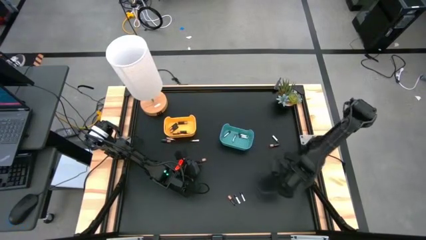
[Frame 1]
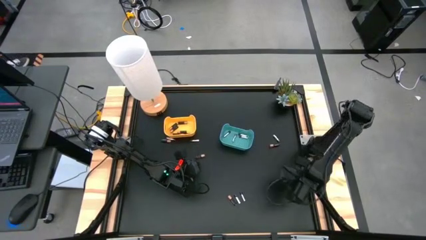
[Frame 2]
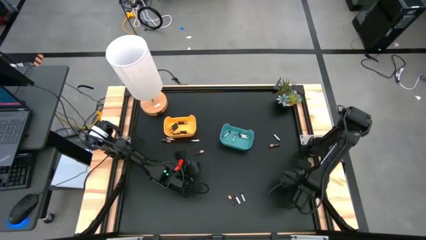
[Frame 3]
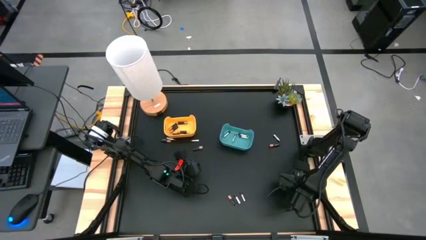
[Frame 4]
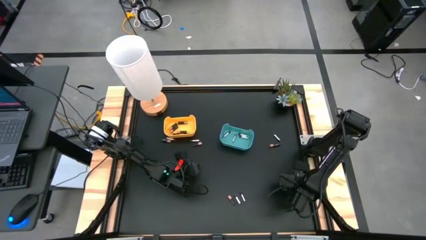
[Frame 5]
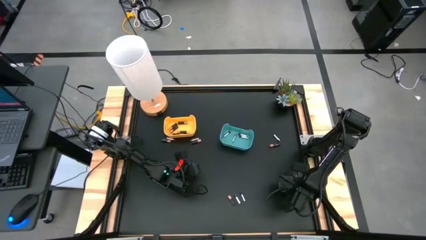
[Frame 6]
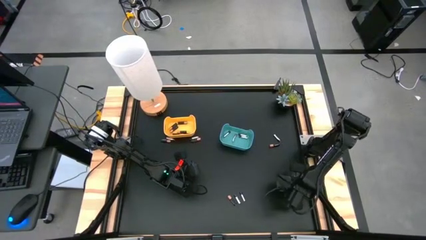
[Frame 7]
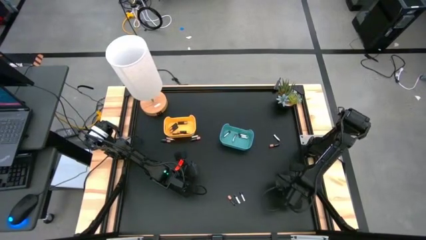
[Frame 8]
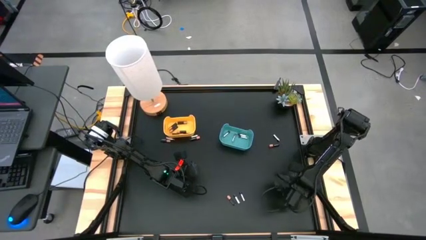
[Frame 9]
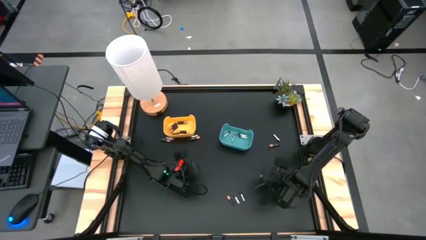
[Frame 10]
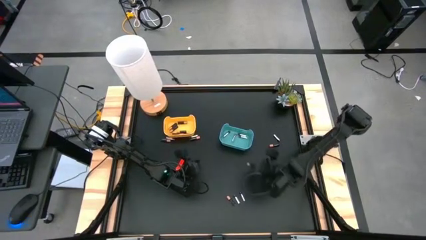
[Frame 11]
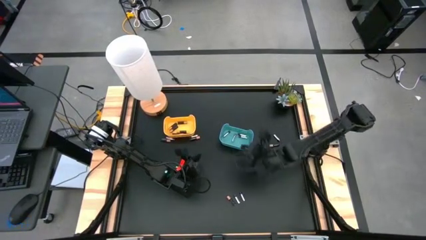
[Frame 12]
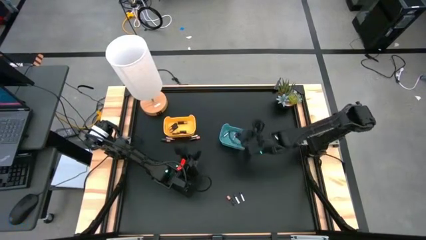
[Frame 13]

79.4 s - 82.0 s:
Task: Sort batteries
Put the silver battery into the blue bin

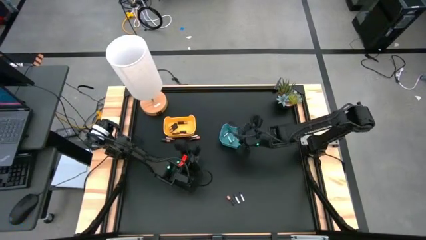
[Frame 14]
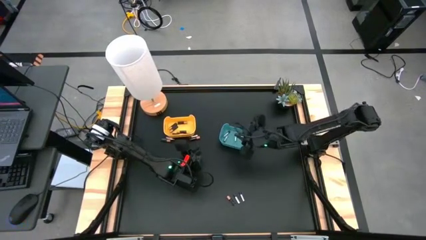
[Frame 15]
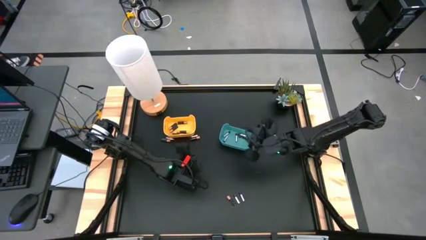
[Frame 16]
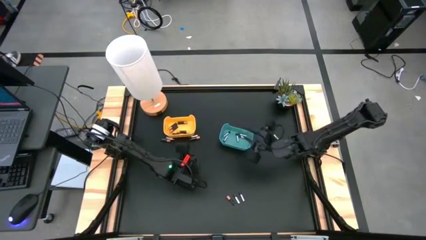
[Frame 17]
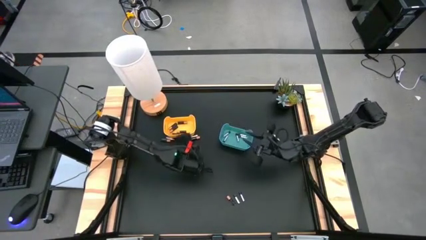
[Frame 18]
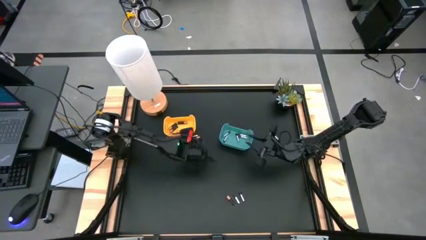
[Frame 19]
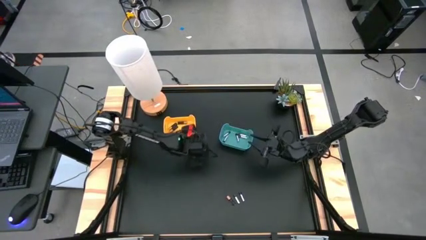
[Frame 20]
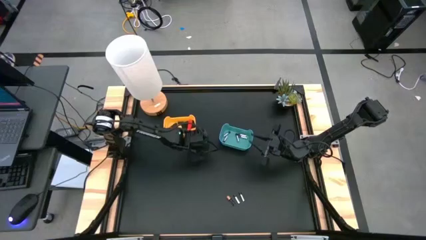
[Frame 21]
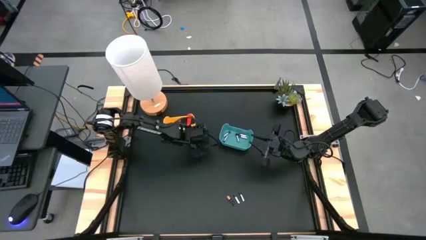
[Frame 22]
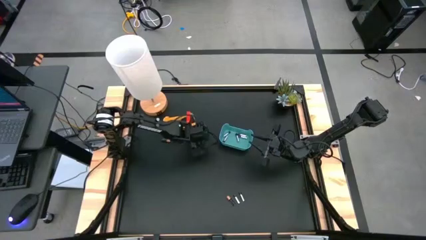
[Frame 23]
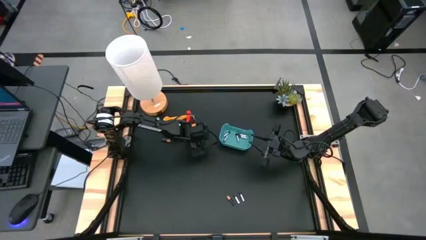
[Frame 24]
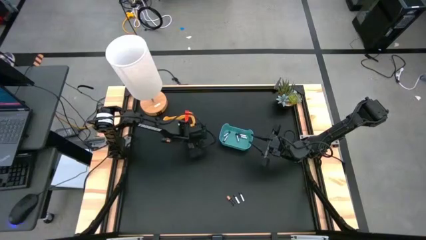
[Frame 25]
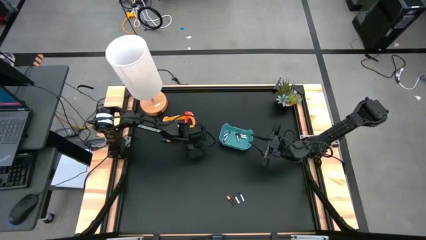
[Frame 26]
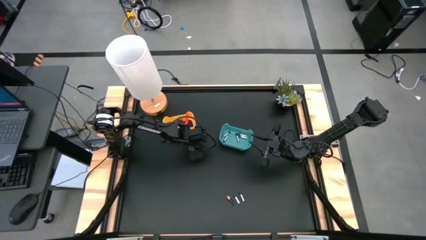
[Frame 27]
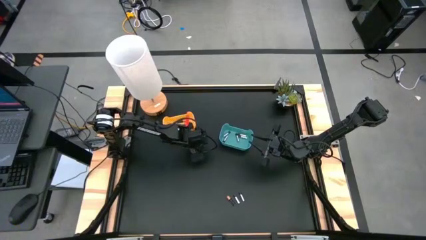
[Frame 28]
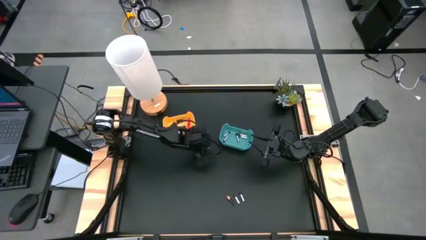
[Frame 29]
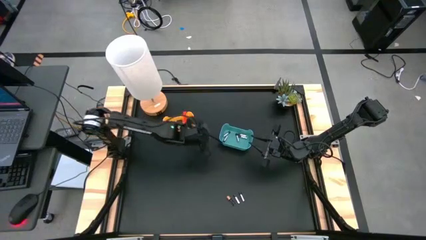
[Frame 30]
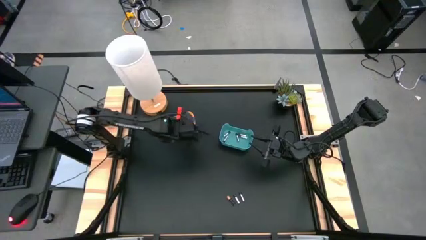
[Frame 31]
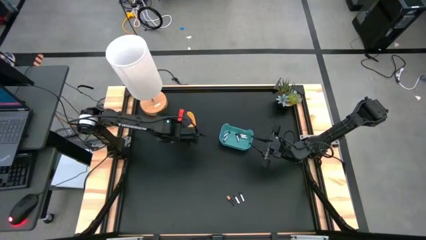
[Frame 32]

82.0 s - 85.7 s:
Put the black battery into the yellow bin

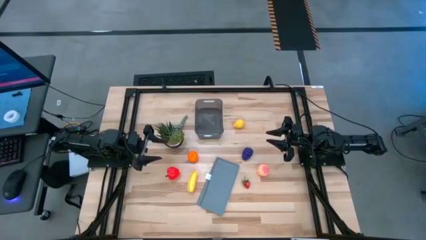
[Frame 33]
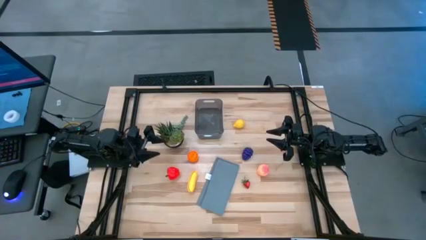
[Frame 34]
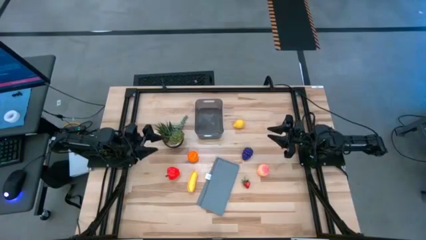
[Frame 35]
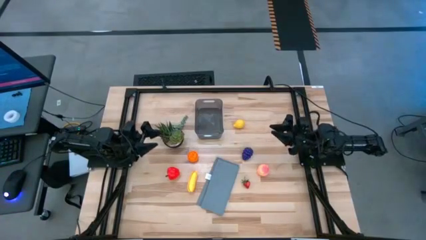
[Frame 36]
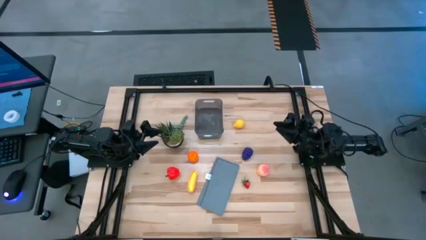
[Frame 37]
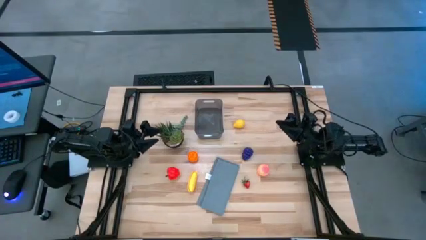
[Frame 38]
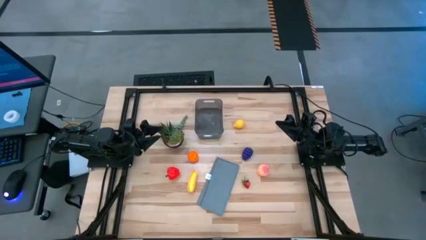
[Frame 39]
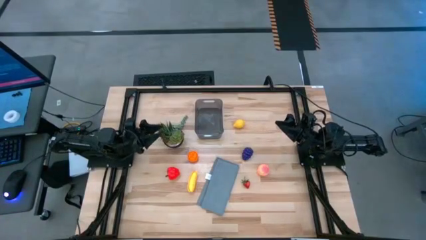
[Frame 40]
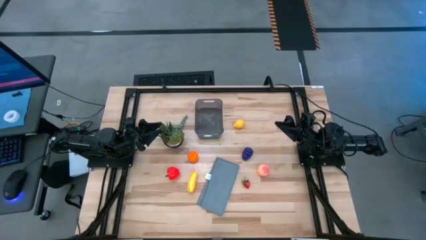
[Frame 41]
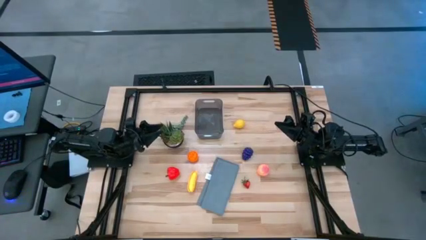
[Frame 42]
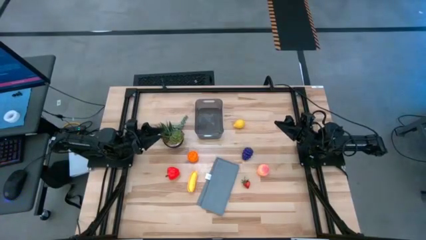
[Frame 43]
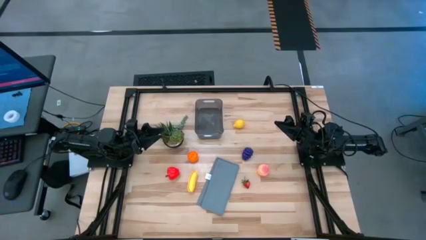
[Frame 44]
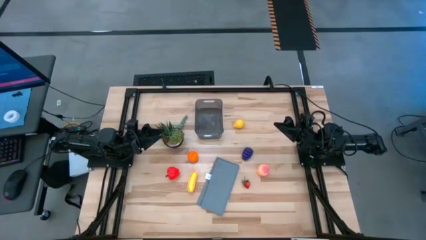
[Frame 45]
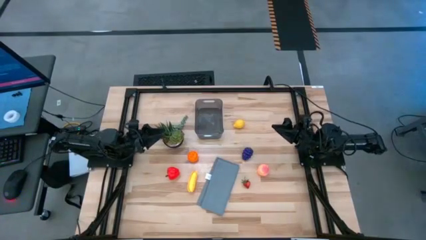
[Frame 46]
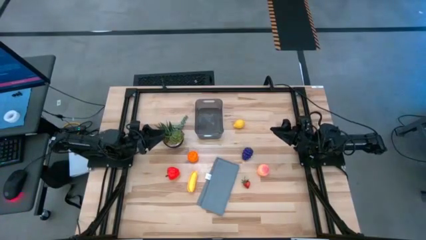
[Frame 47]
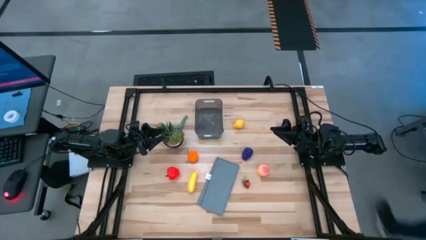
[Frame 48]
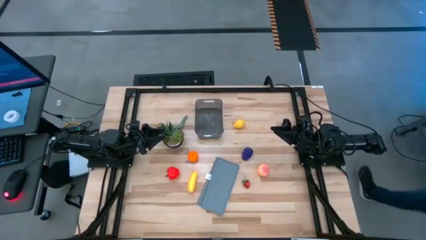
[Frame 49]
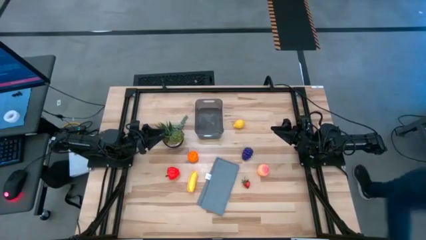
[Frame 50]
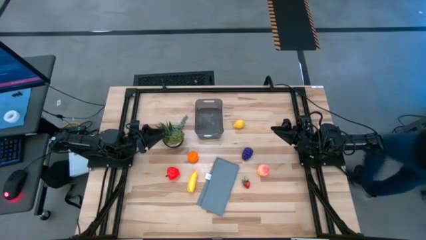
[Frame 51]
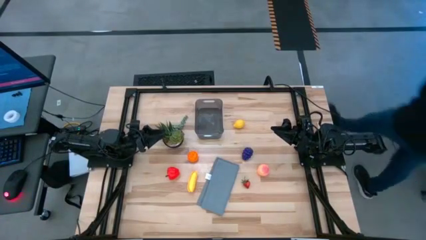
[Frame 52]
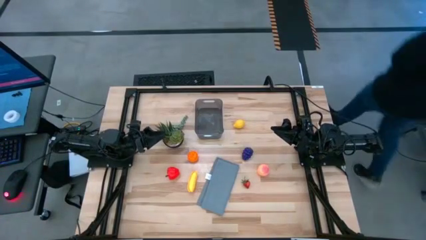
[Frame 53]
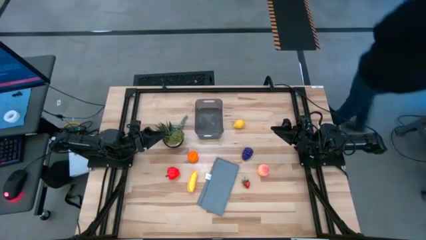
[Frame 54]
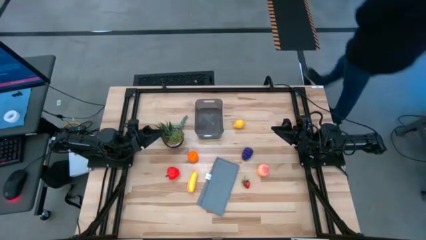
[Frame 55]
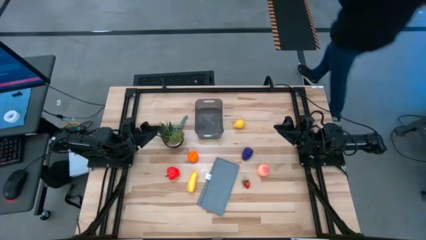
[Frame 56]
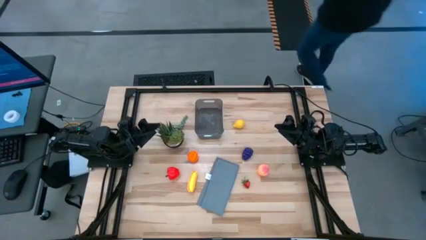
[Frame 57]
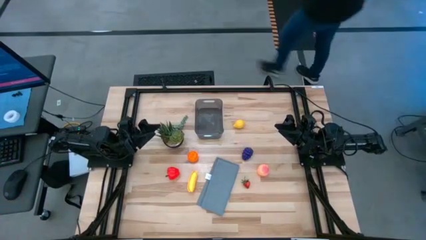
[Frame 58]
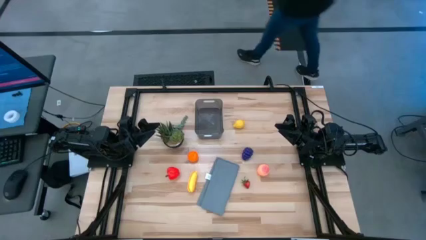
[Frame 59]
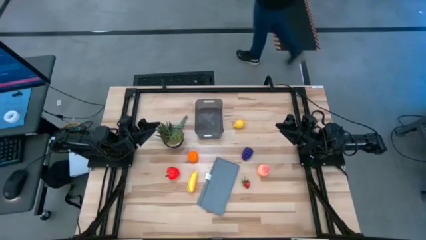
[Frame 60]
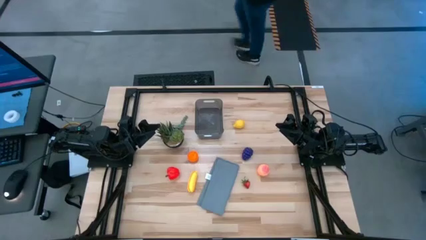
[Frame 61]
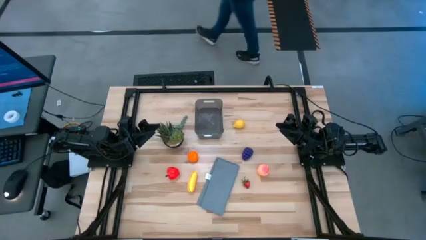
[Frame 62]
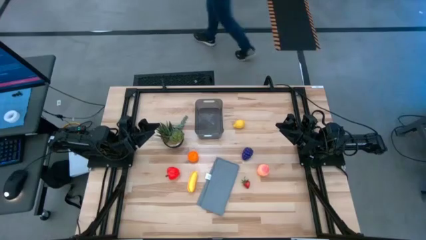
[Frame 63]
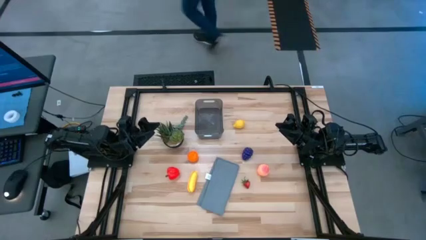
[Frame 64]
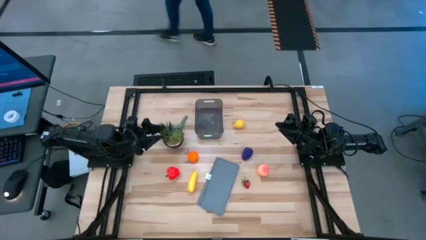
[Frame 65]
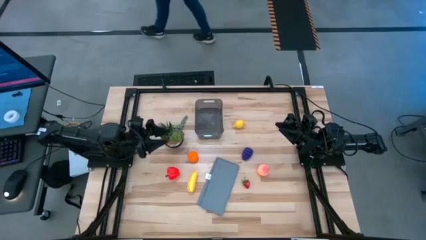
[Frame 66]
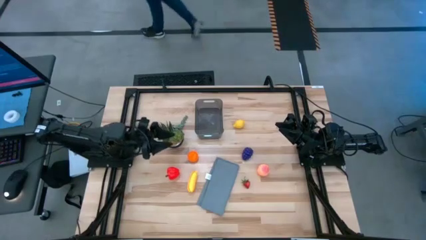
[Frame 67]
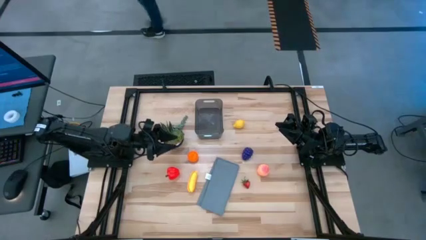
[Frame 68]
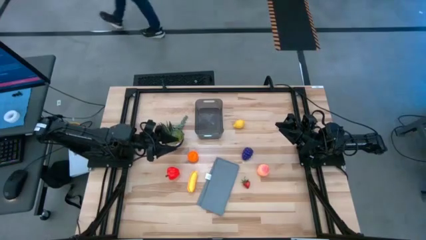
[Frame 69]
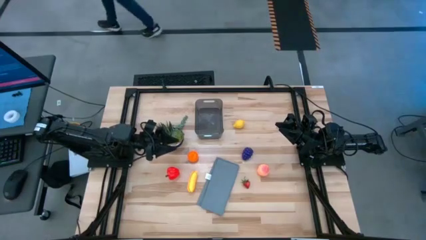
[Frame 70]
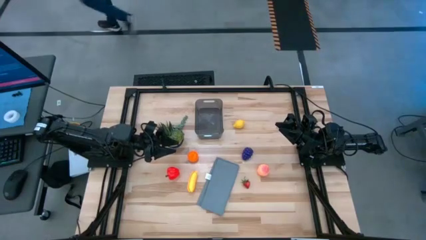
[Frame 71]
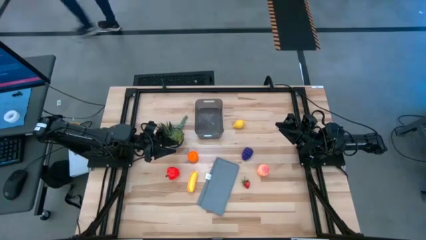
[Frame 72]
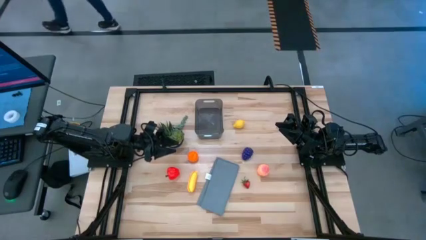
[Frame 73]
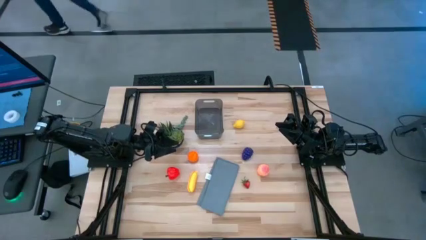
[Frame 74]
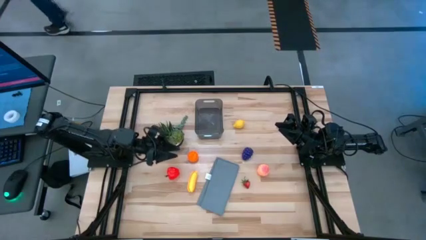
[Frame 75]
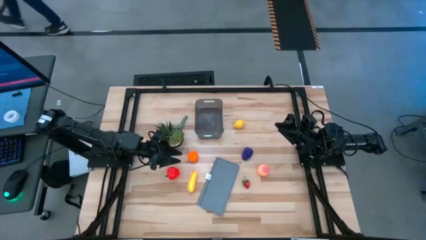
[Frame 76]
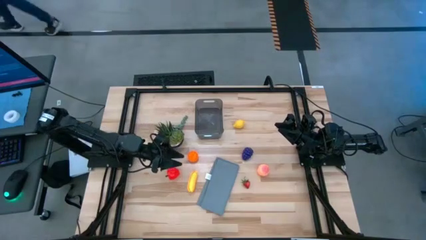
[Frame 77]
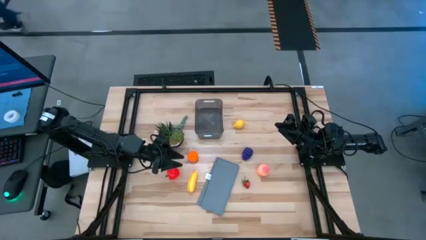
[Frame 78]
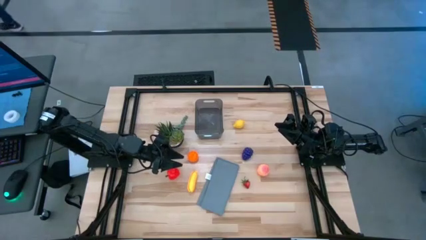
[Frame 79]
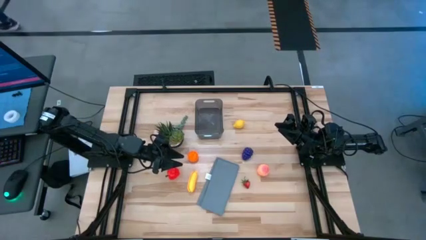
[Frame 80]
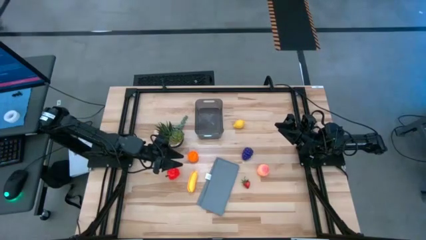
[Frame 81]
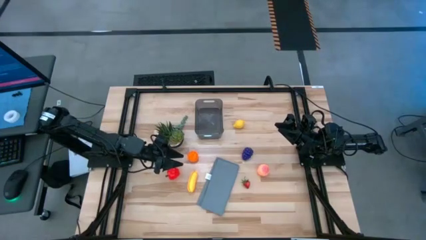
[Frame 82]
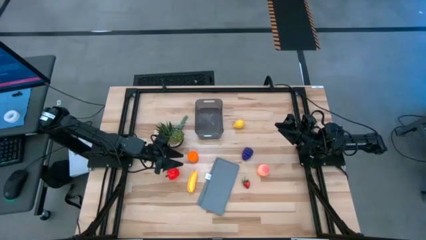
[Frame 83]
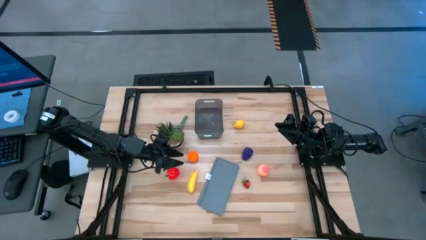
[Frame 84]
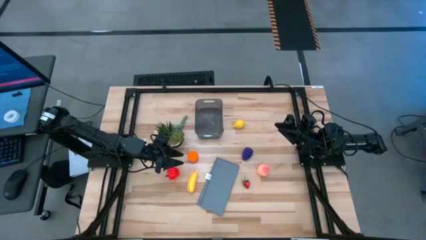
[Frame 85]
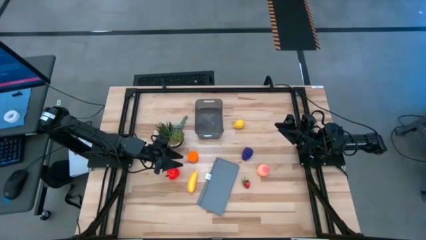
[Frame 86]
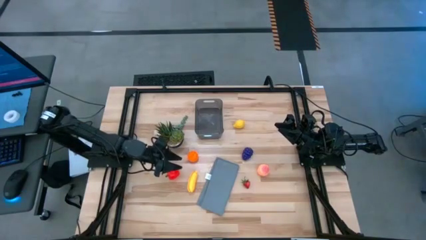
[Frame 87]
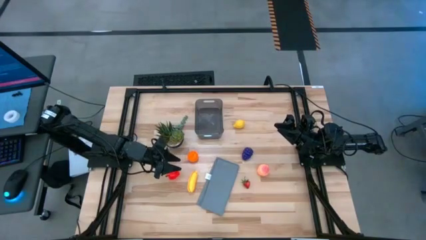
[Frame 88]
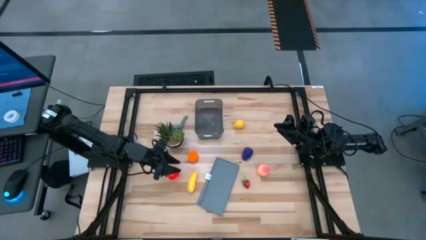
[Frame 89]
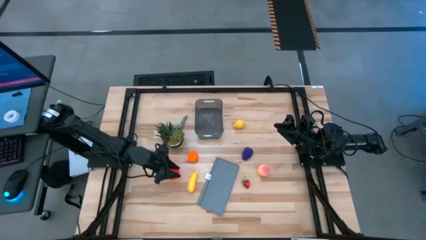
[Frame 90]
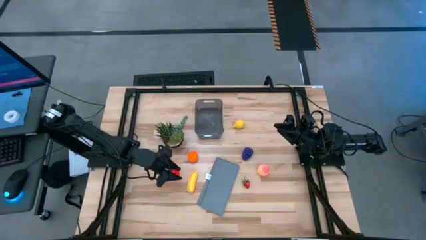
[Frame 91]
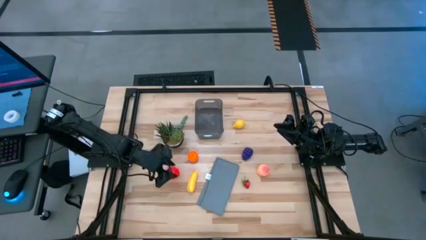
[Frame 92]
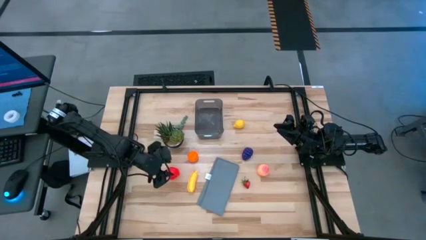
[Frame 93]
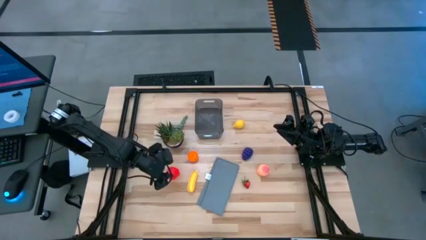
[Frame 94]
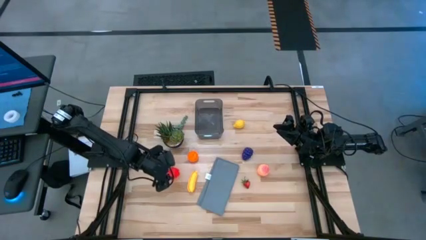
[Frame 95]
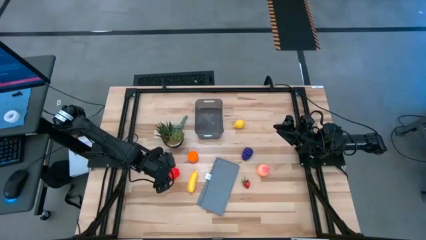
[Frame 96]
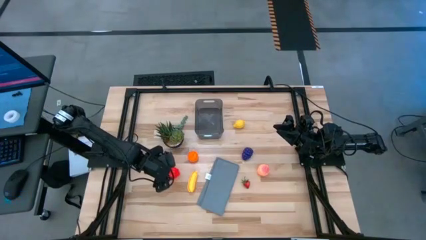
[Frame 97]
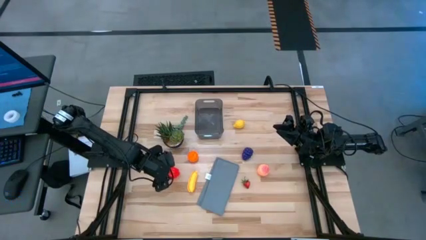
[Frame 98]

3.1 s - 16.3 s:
Task: Pick and placing Produce into tupperware
Put the red apple into the black bin
